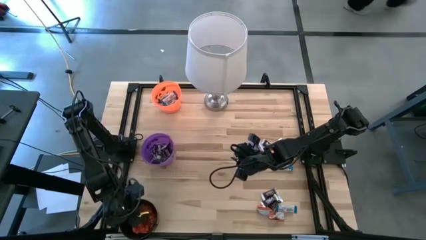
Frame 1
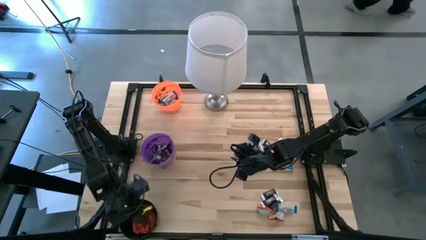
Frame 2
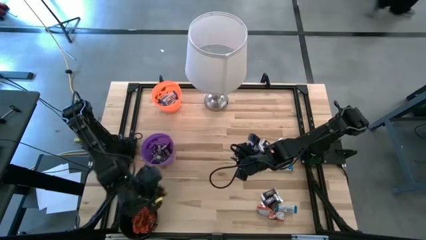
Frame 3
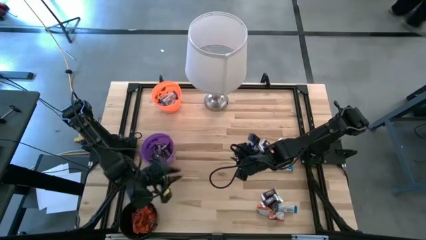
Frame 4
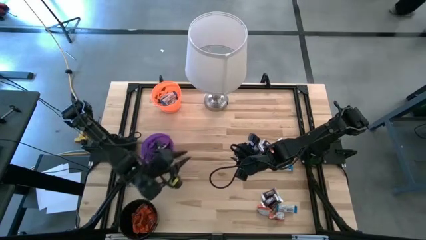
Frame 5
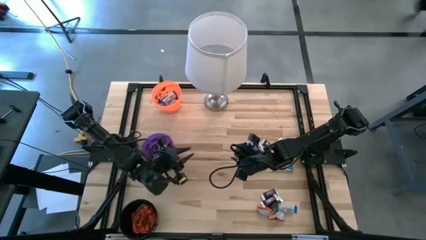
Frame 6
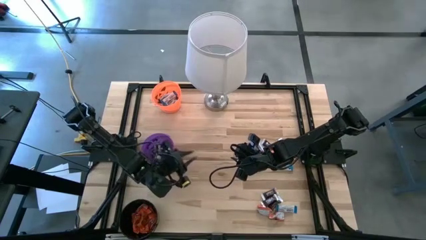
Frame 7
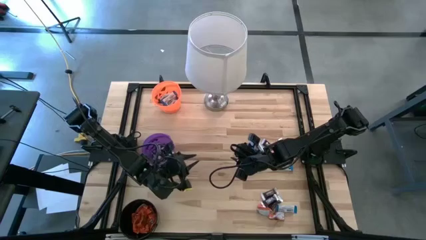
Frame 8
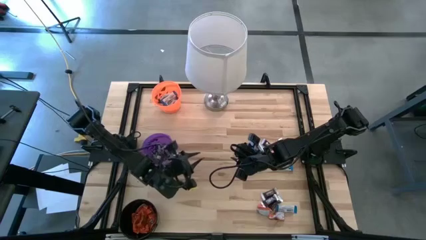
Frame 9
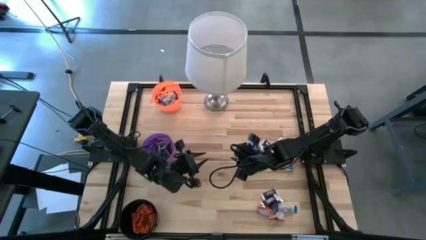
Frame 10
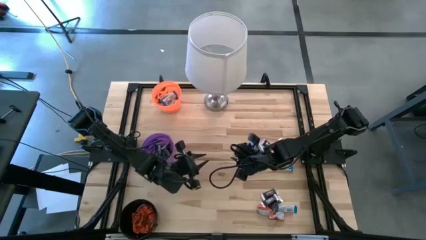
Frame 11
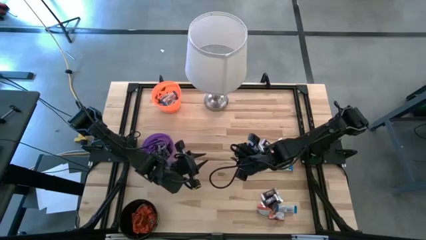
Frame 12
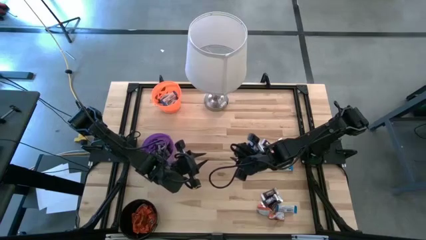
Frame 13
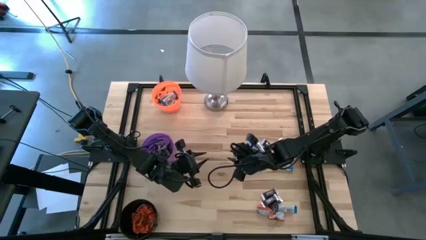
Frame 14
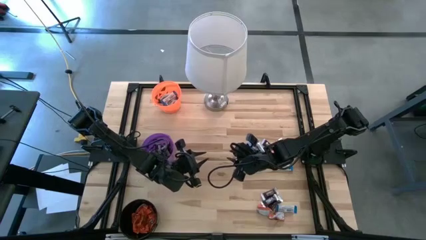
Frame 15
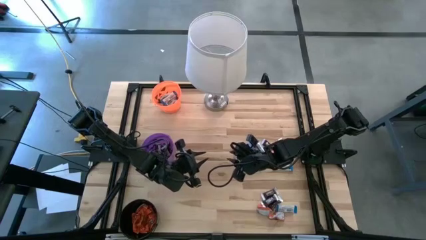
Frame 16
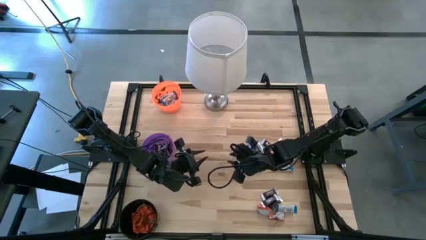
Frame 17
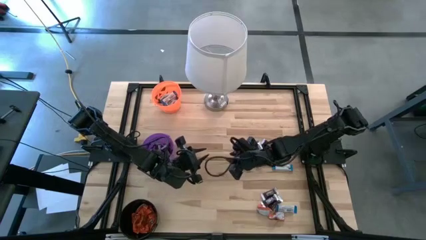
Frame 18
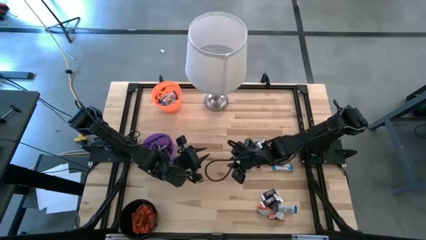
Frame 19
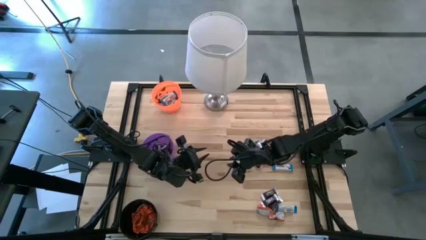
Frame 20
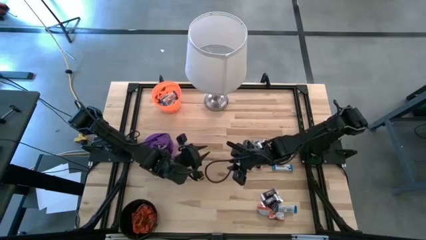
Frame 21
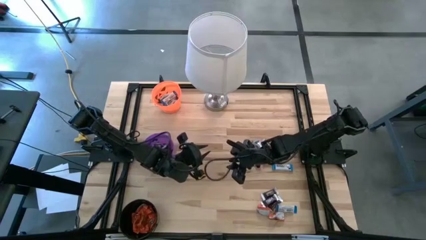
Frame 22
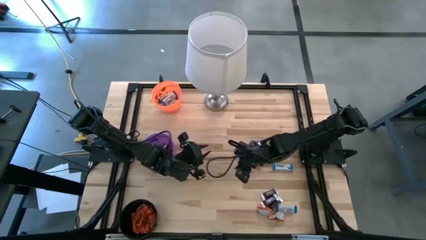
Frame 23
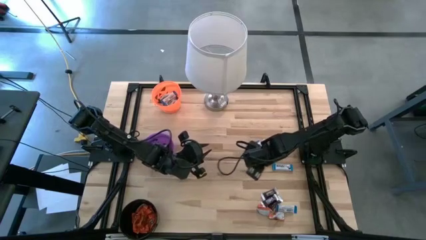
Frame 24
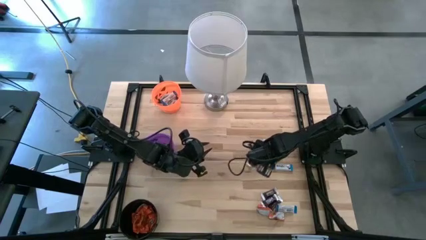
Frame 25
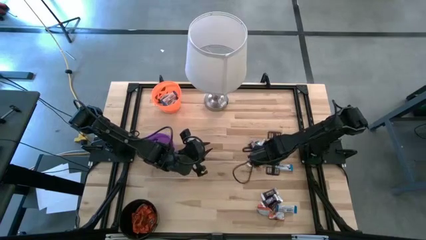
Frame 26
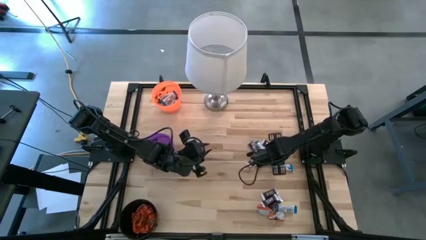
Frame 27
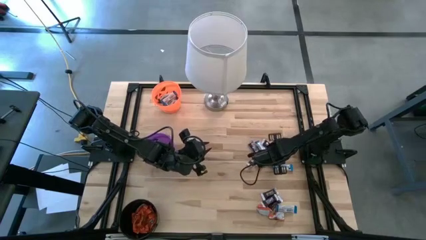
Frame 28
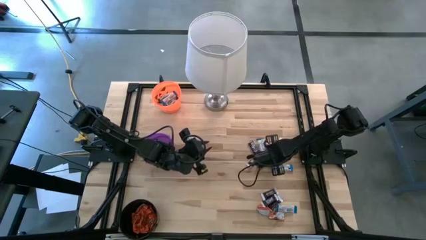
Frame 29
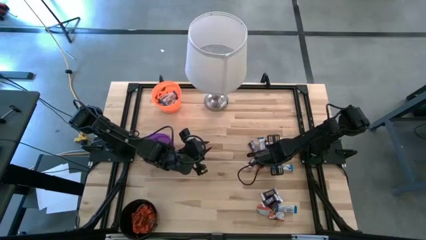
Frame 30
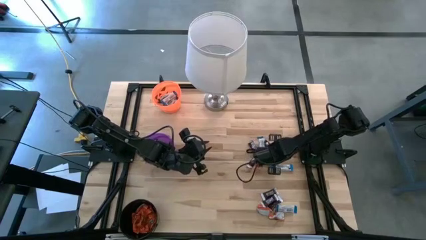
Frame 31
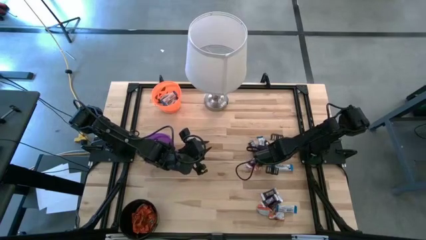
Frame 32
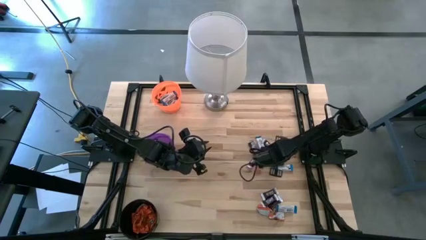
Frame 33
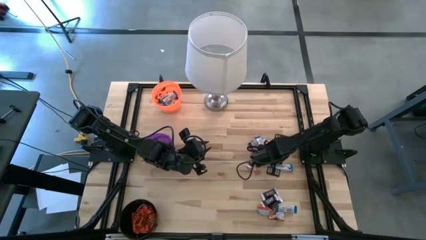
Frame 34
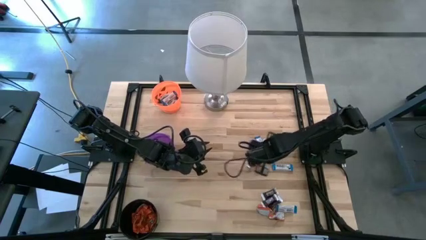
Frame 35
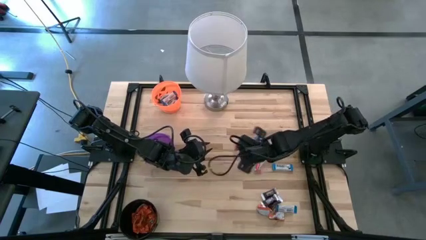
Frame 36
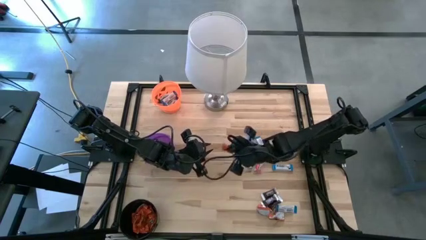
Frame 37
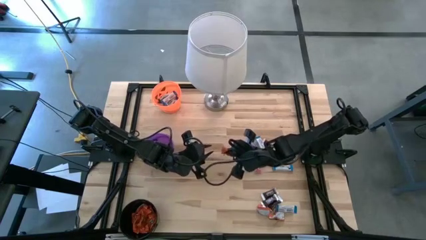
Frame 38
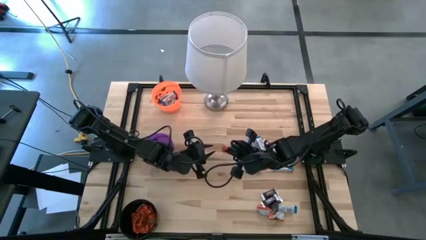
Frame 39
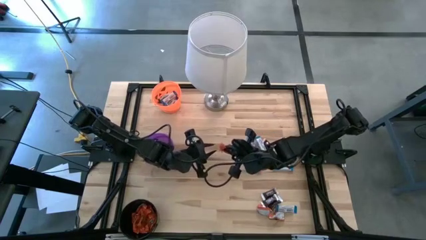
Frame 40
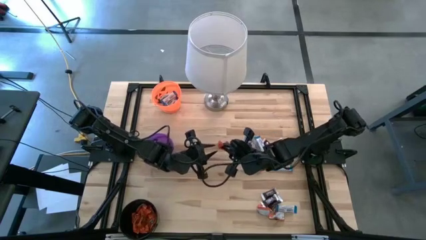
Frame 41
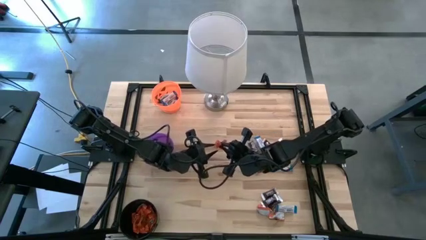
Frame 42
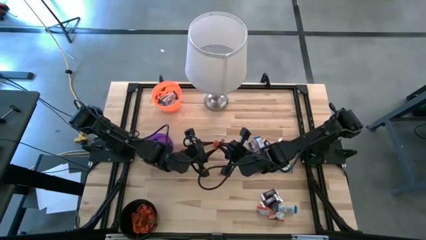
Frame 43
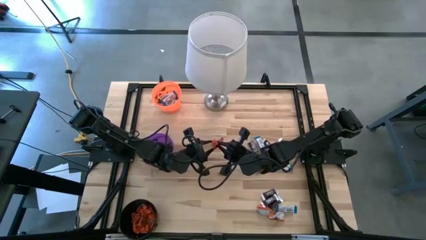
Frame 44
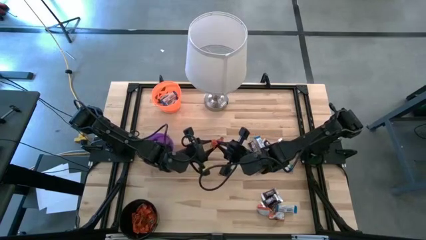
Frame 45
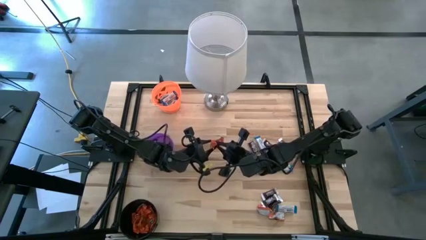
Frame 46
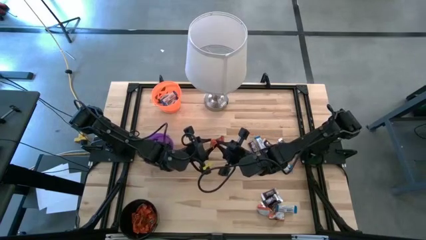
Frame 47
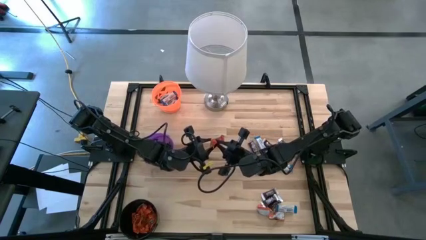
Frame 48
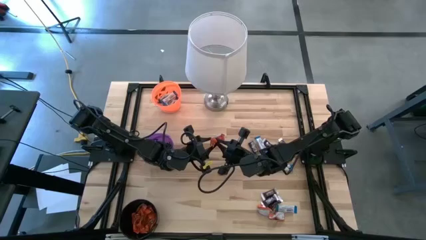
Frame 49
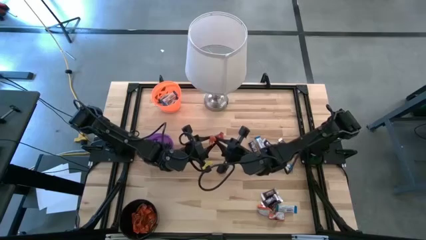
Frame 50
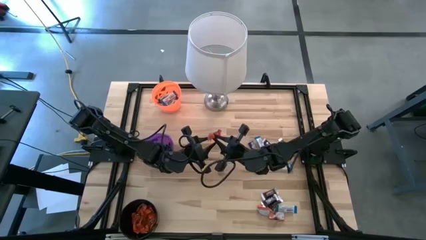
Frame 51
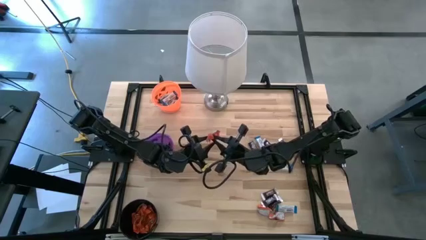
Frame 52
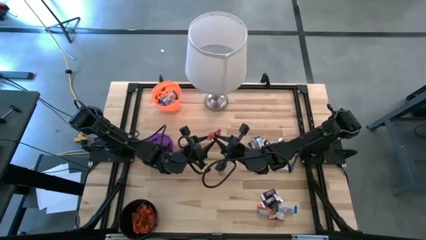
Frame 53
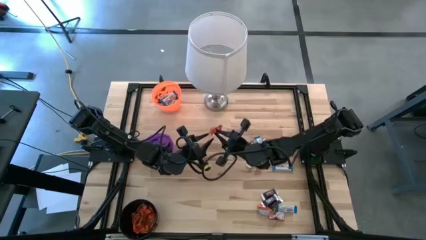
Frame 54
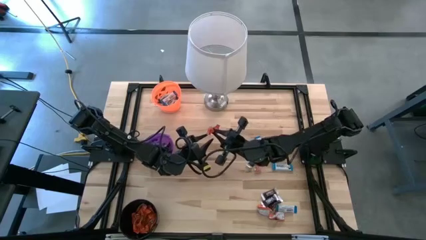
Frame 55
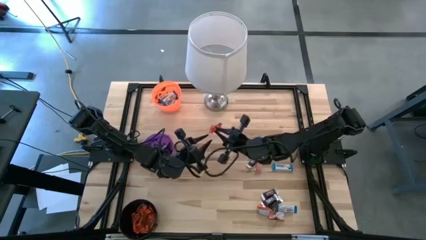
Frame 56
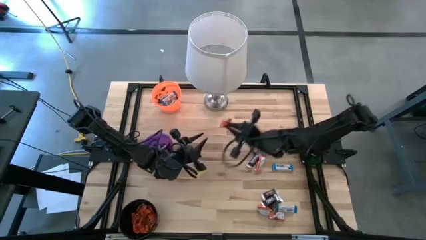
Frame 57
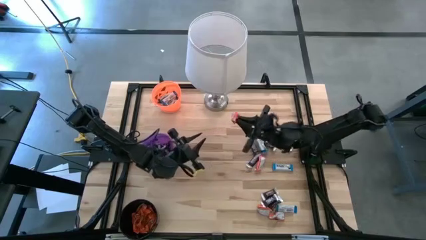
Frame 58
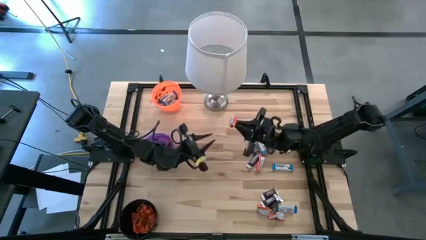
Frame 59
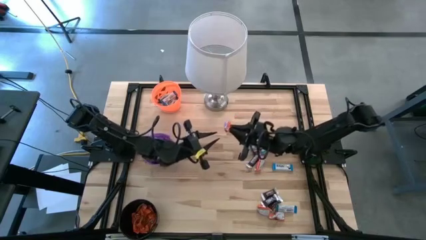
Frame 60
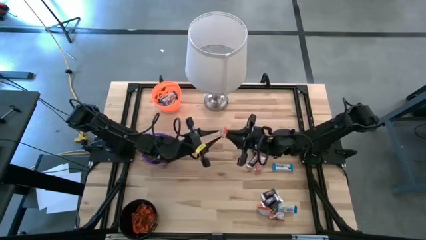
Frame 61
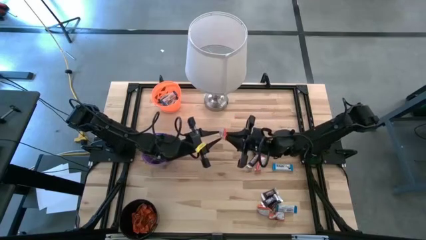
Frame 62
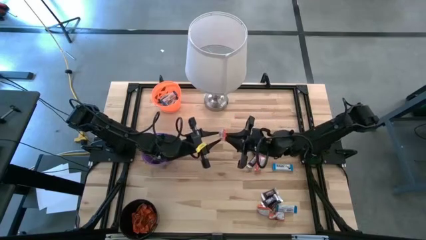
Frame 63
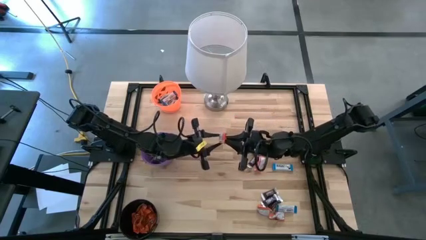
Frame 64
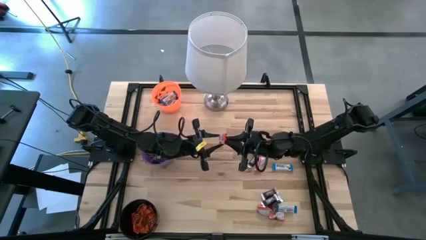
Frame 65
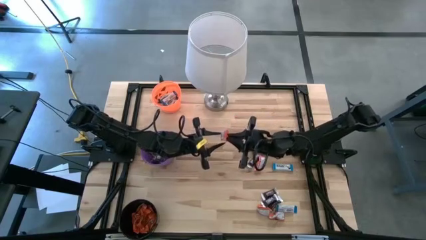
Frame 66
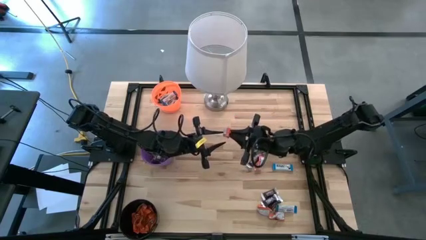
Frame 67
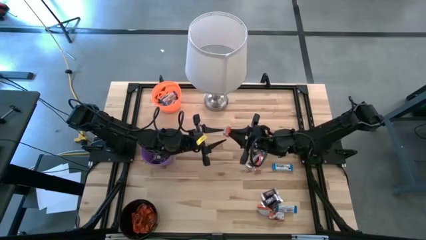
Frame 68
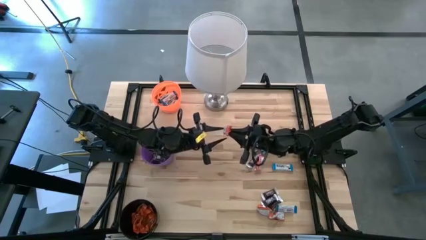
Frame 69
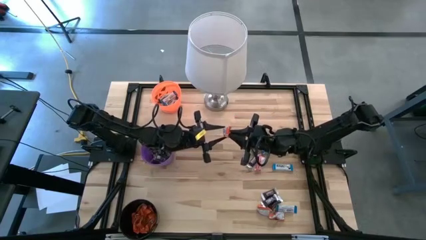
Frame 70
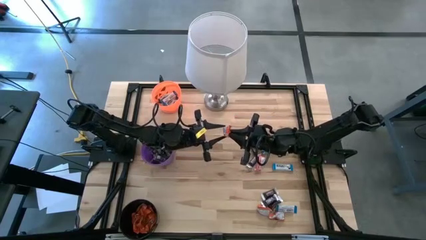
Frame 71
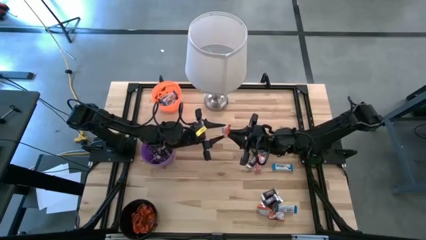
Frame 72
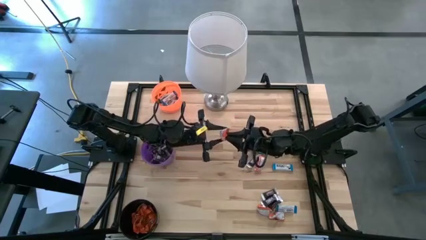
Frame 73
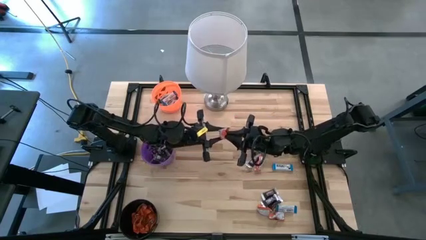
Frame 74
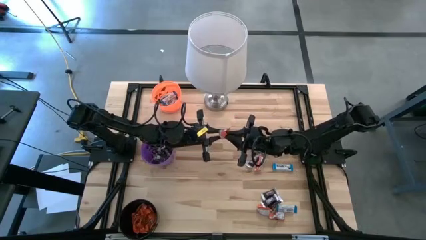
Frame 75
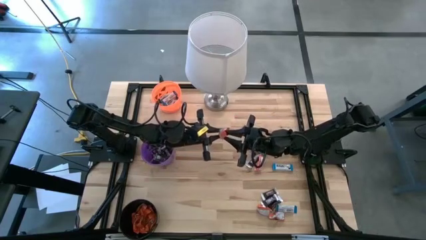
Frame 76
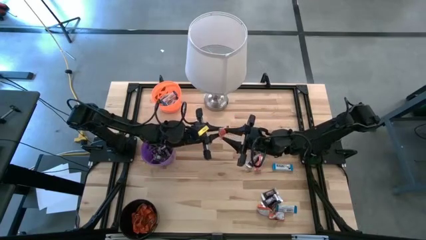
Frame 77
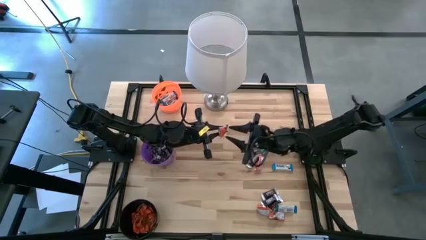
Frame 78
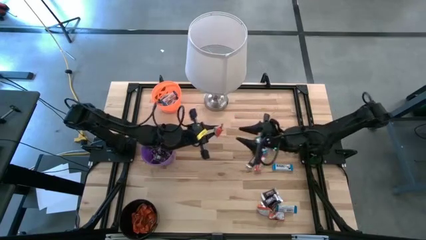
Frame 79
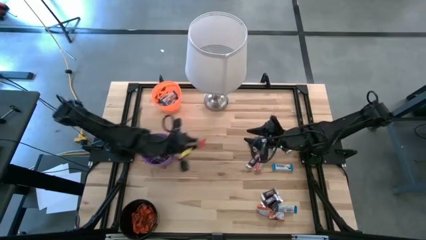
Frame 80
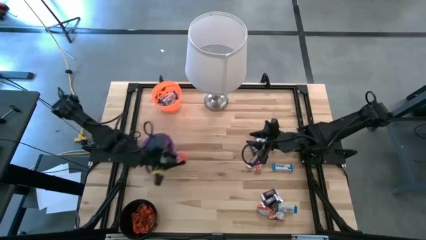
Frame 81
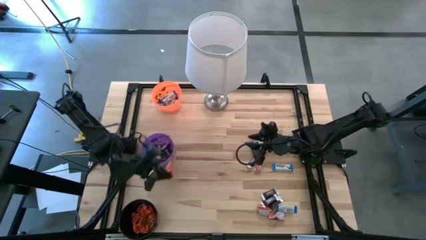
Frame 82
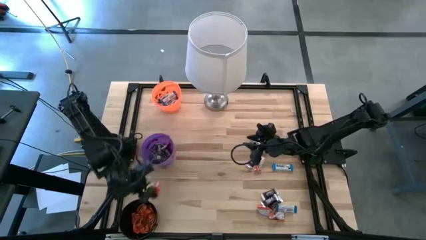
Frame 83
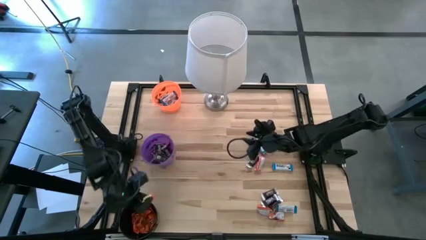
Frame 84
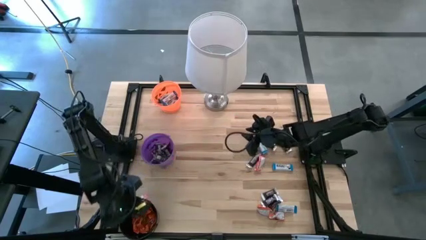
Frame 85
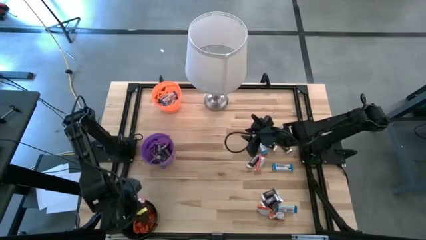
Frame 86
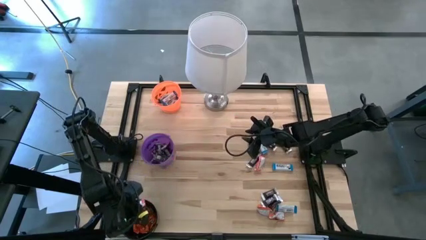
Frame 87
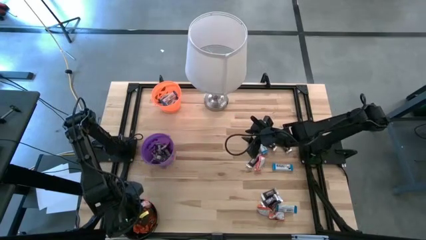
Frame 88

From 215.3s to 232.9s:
Task: Sort candy
Put the orange chocolate into the black bucket
